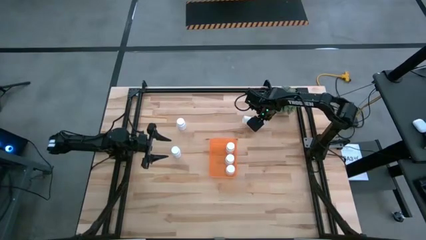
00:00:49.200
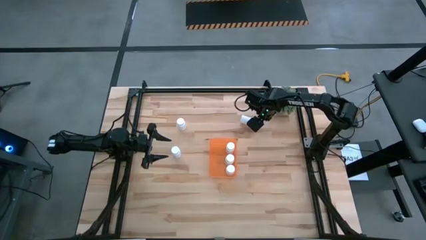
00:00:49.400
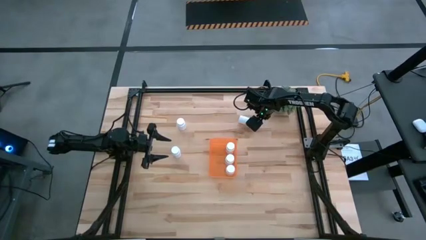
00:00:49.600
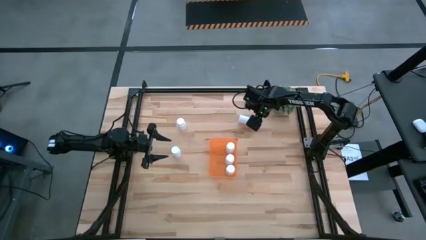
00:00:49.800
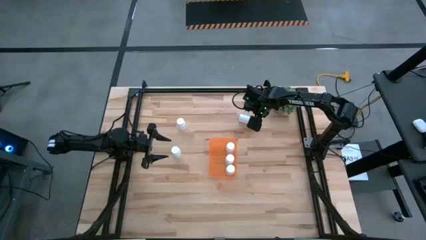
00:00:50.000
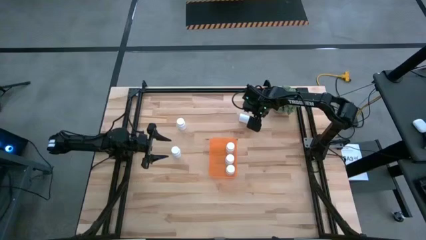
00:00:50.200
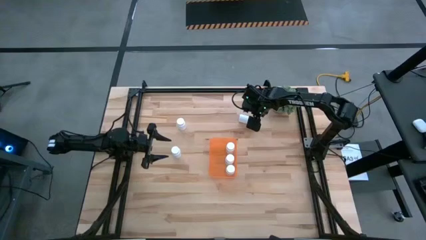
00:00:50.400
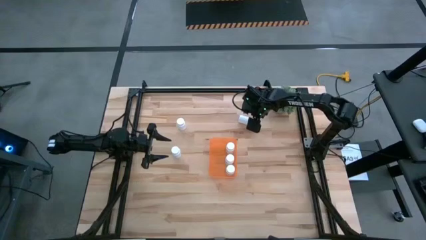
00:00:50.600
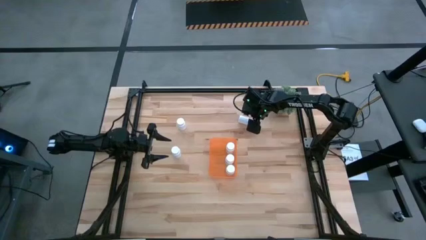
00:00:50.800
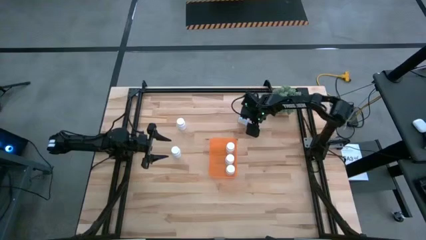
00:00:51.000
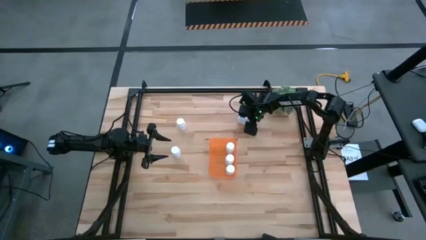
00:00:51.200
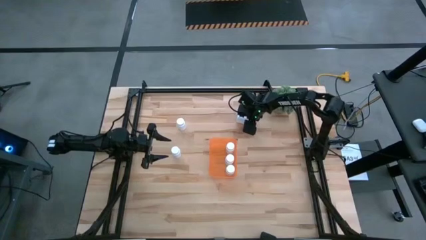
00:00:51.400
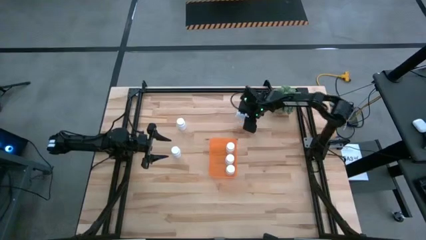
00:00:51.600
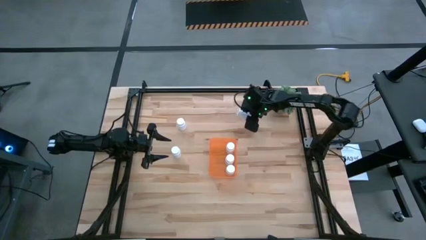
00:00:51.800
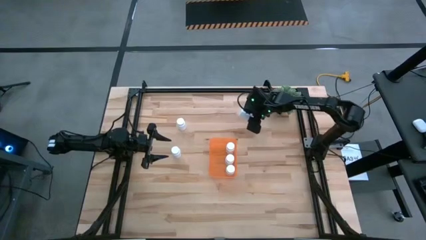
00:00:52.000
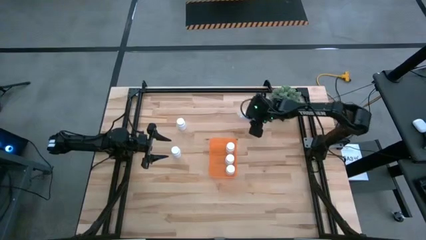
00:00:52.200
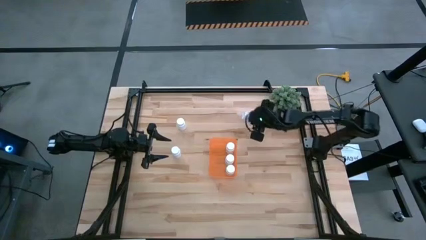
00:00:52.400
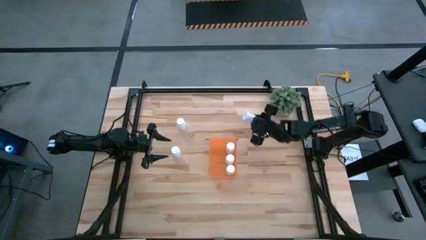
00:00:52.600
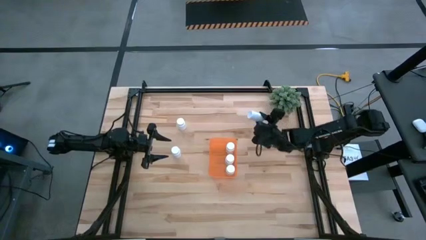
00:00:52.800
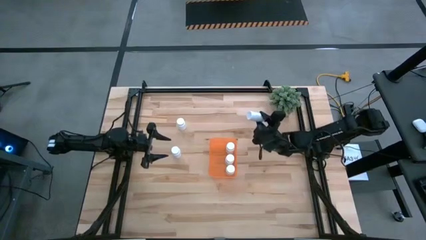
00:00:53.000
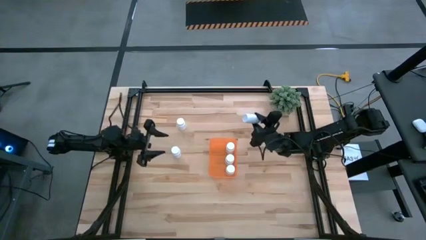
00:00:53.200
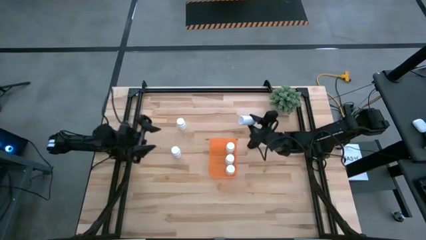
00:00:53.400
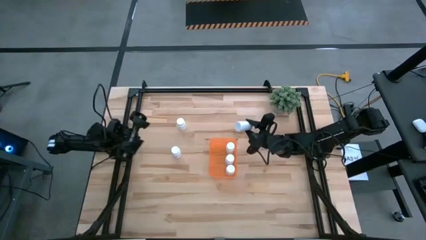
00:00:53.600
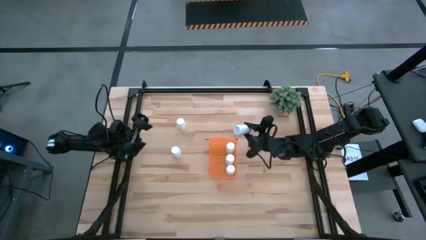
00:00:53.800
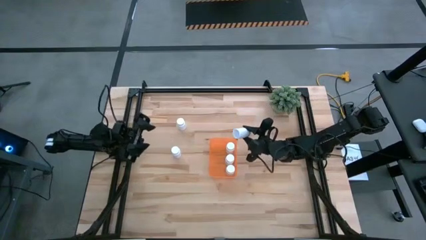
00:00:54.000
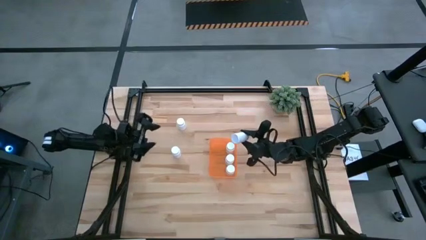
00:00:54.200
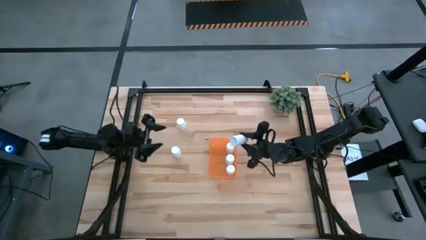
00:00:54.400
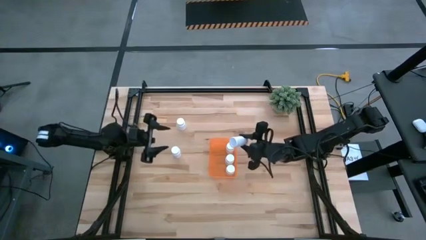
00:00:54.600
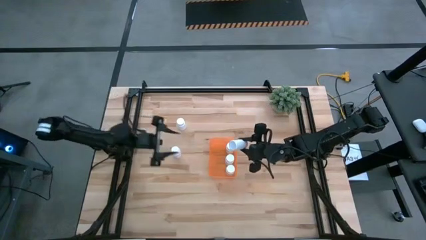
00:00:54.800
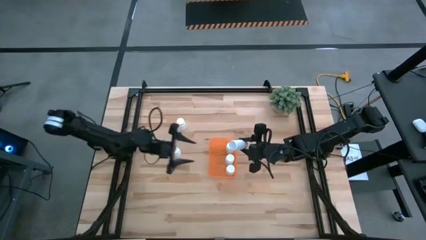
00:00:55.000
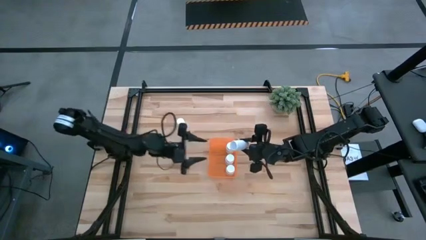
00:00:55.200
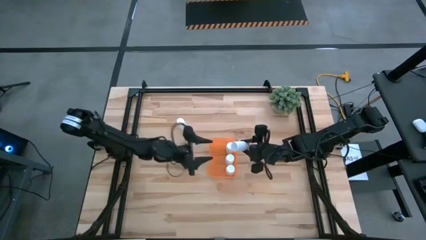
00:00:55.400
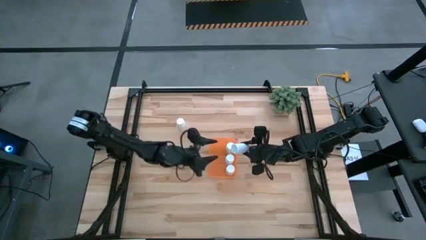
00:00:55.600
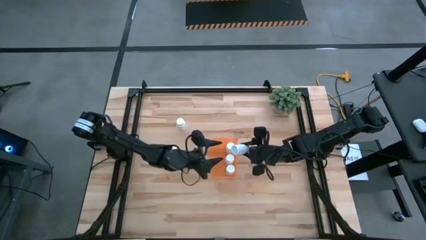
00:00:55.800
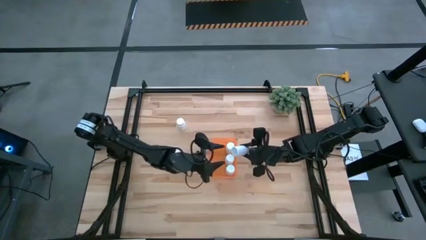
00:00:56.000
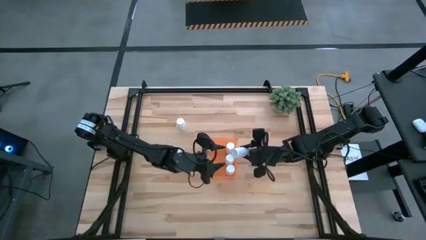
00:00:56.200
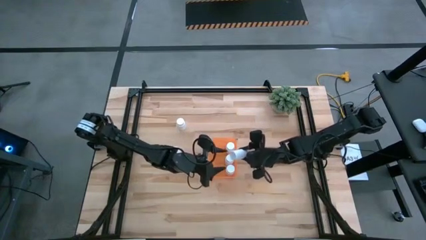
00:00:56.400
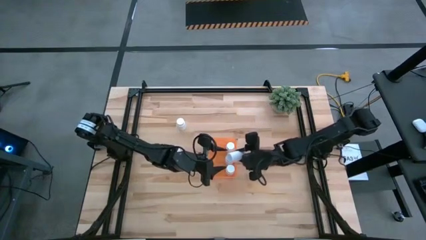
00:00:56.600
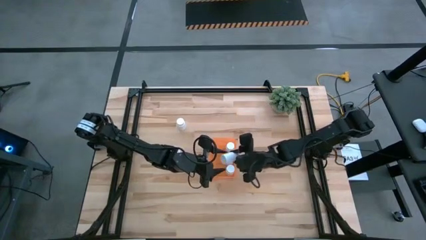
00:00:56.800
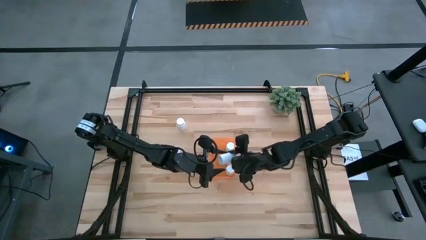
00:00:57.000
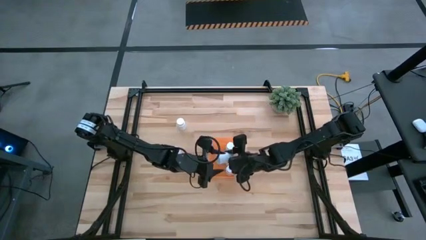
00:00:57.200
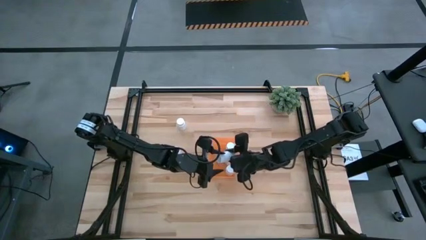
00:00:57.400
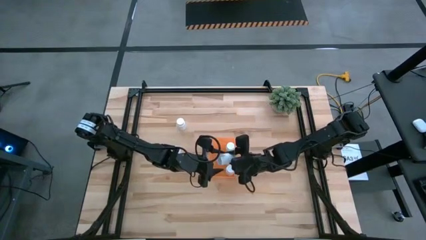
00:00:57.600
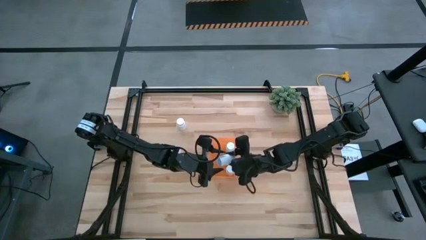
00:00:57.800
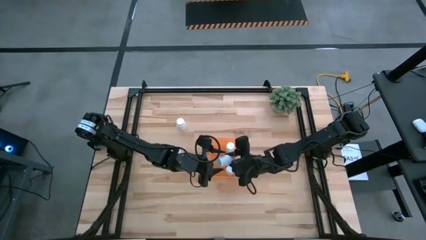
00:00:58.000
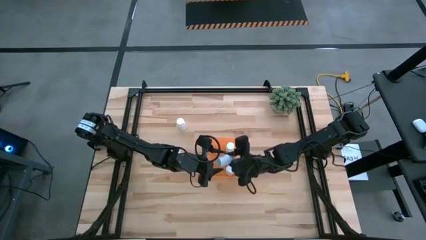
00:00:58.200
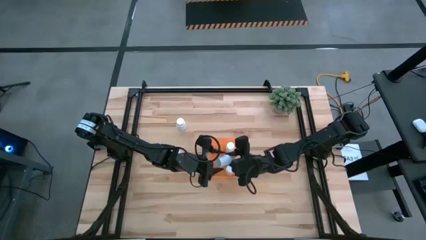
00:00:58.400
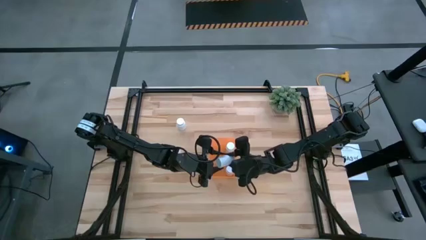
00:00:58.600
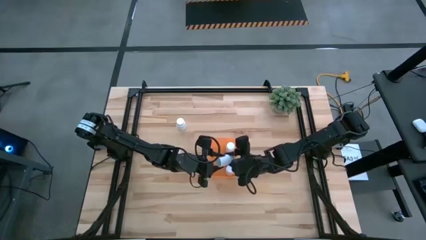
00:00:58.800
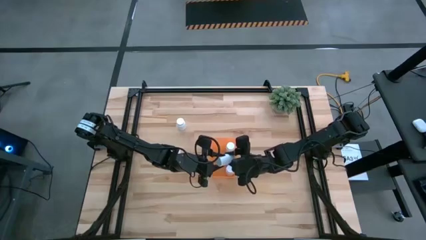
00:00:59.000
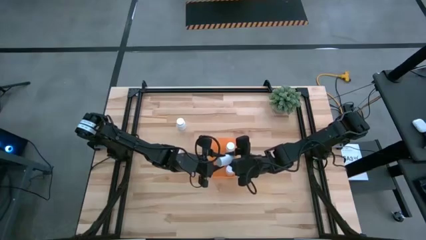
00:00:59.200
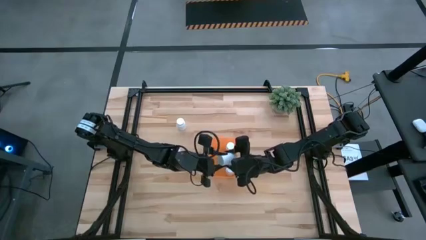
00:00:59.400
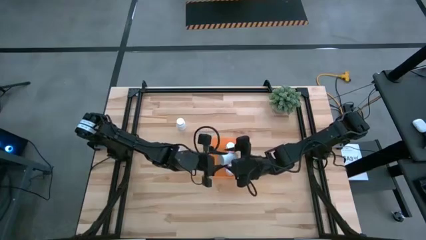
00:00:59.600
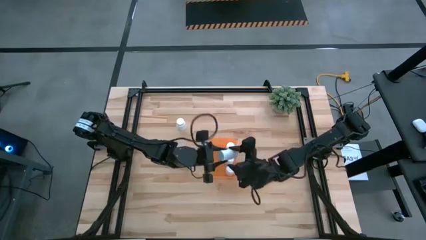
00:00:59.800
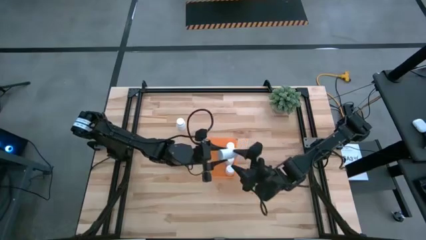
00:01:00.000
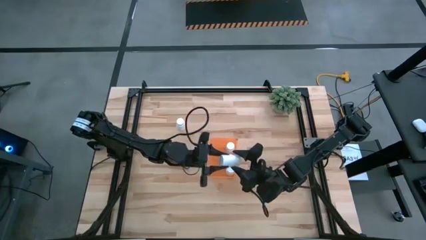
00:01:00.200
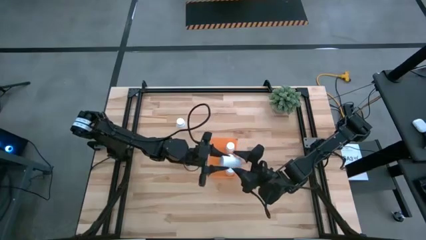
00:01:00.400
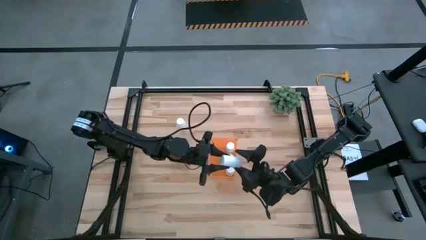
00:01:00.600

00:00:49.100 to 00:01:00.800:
Task: Pick and place pill bottles into a basket
Put the white pill bottle into the orange bin
